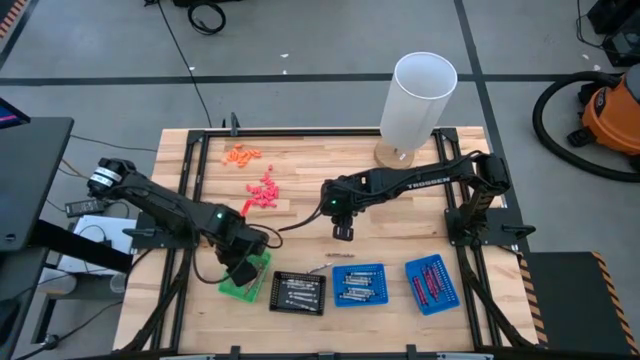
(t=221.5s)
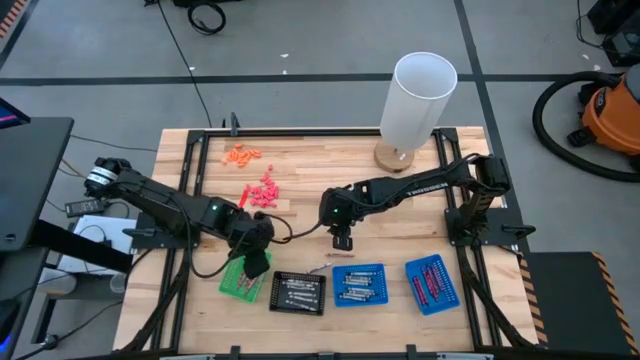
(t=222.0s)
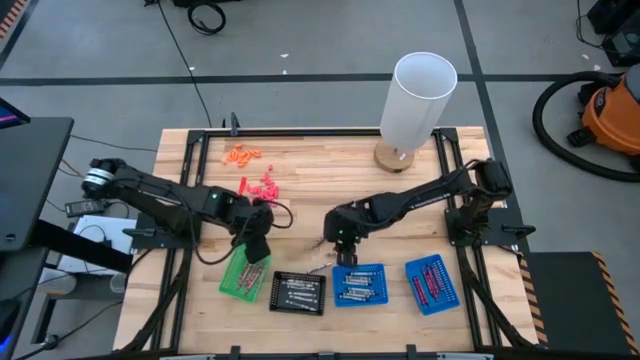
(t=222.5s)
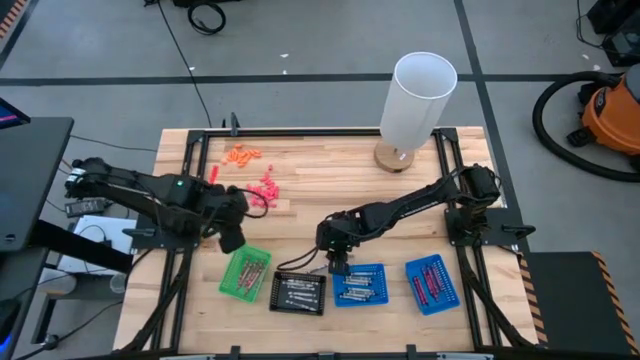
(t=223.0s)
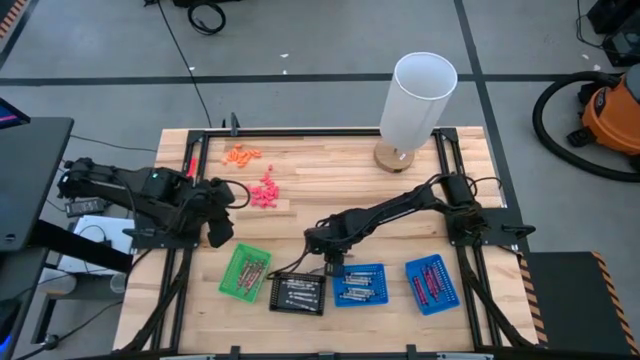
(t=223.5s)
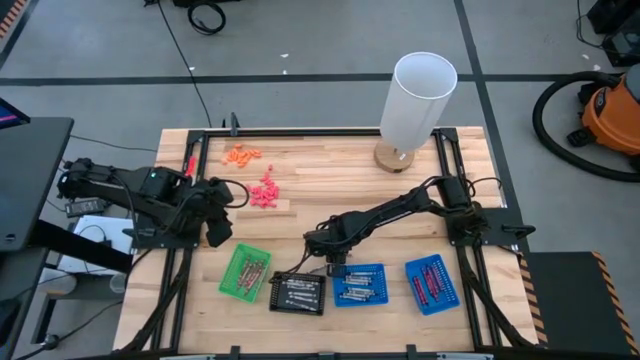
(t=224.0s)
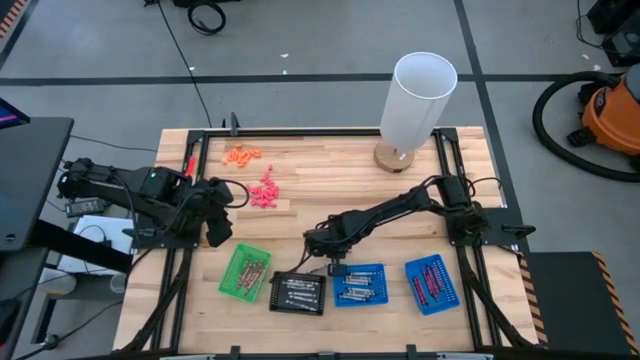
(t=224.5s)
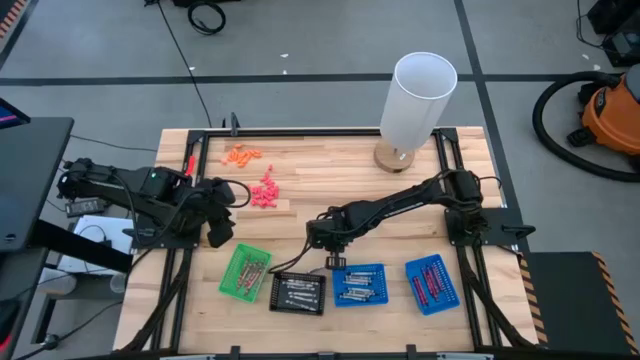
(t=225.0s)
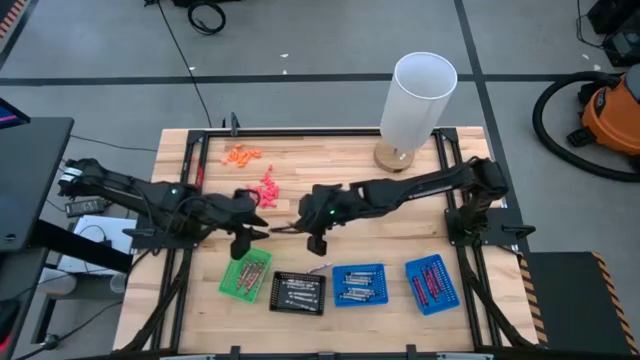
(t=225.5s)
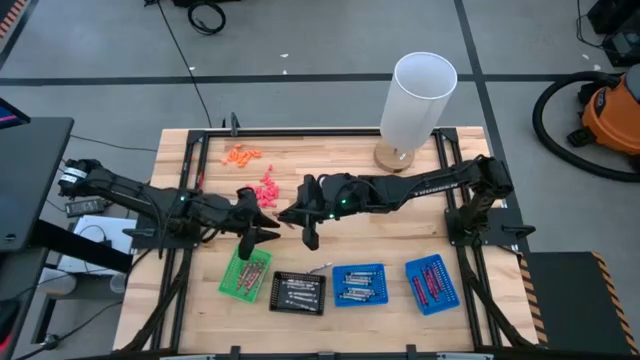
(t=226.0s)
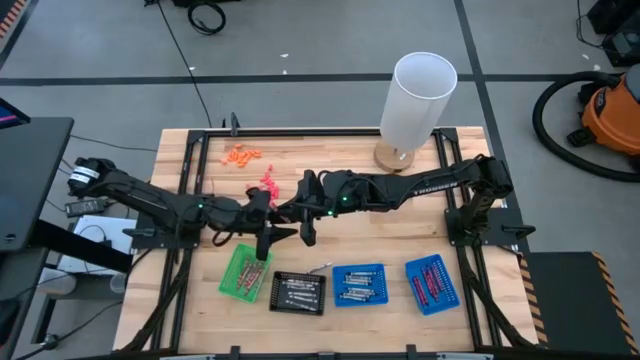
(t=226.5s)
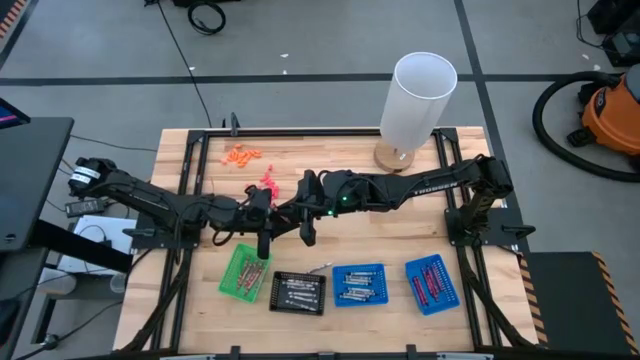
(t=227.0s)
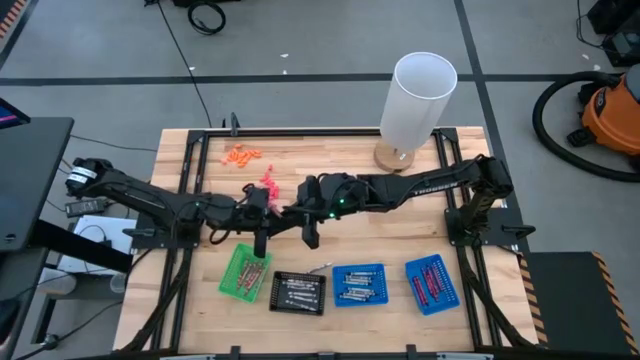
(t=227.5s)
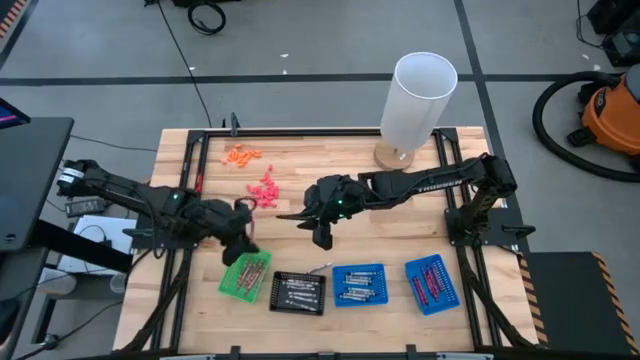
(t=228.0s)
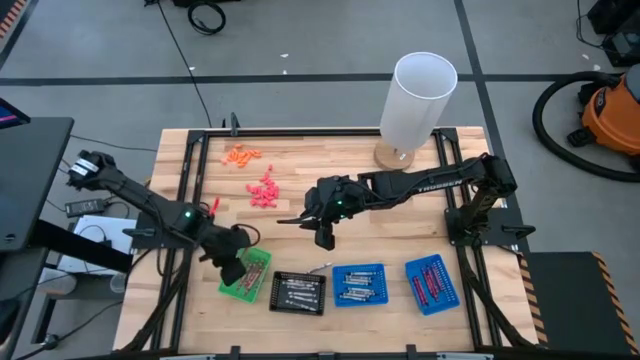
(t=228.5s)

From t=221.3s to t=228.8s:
Task: Sort crayons
Put the pink crayon into the green basket

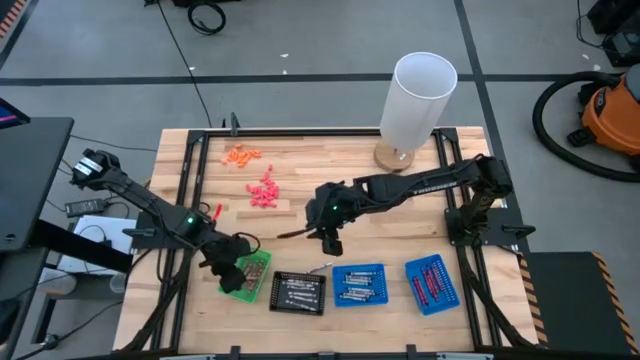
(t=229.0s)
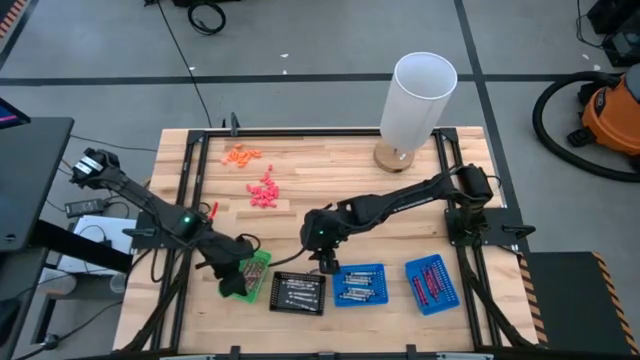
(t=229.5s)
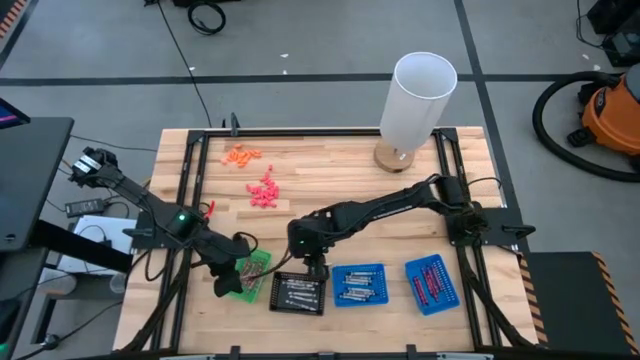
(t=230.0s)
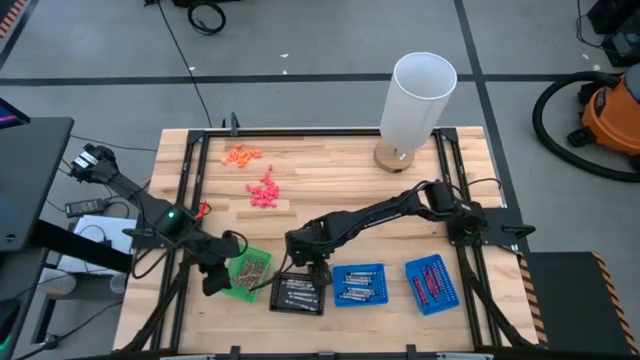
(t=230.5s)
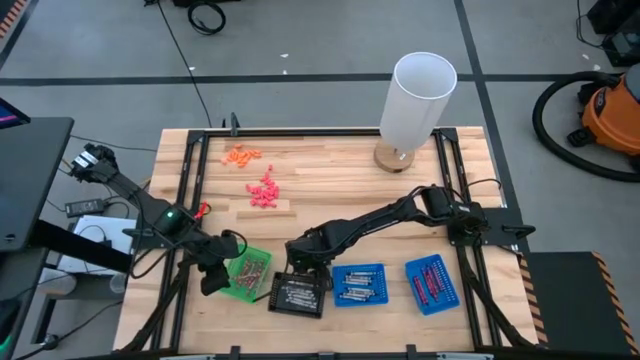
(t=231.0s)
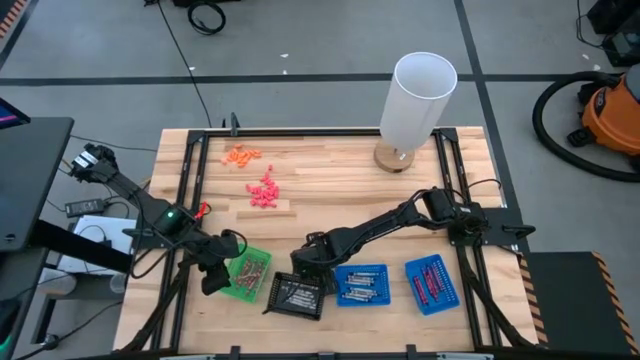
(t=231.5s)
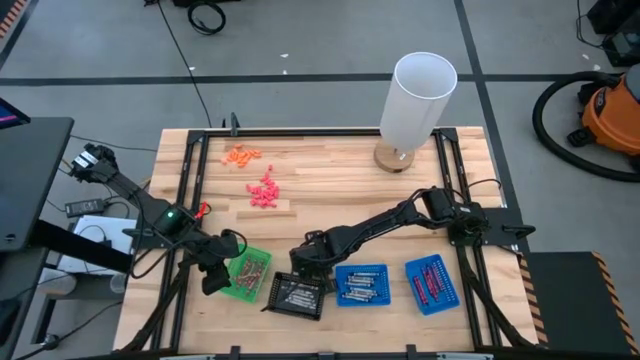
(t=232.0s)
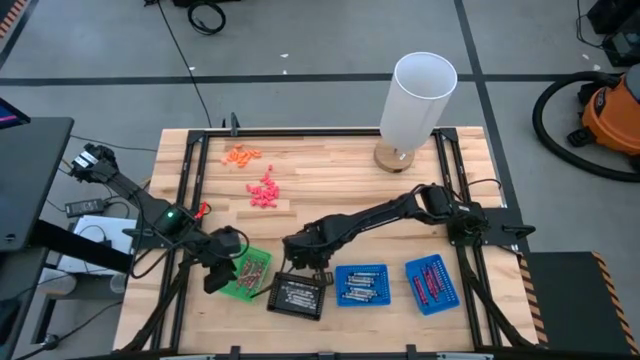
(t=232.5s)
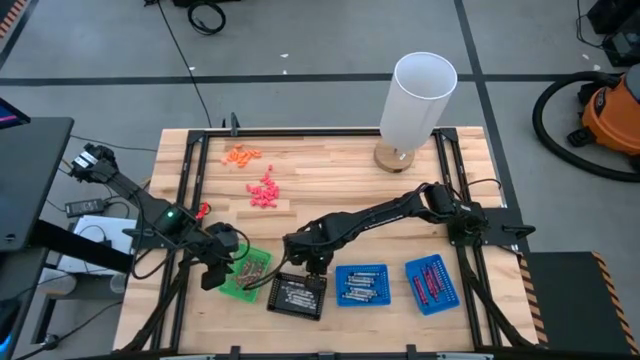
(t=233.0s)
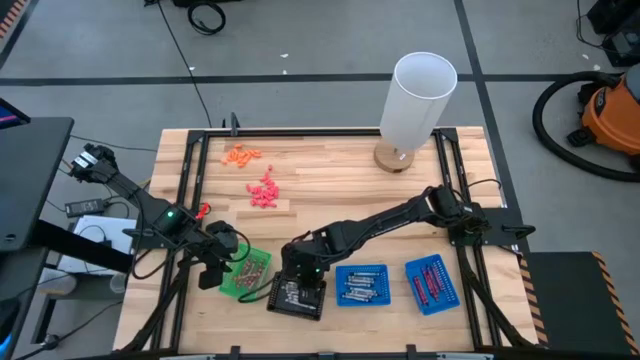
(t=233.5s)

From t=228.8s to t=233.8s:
Put the white crayon into the black basket

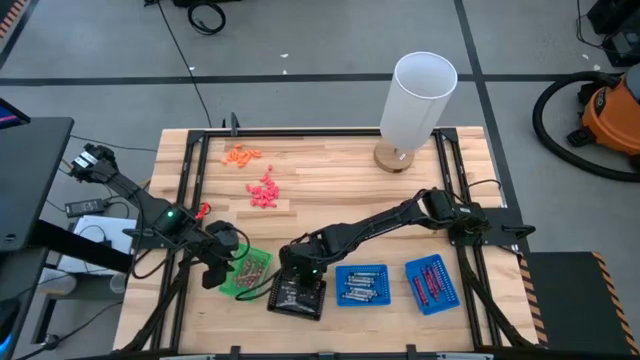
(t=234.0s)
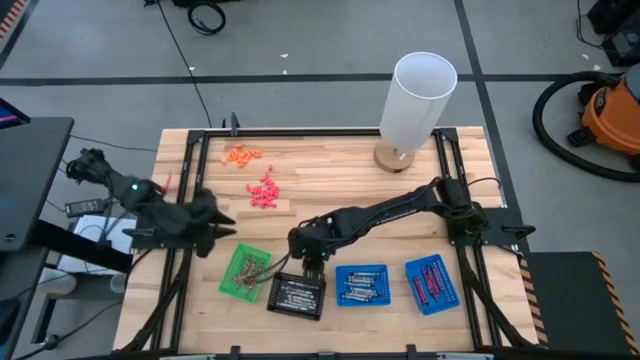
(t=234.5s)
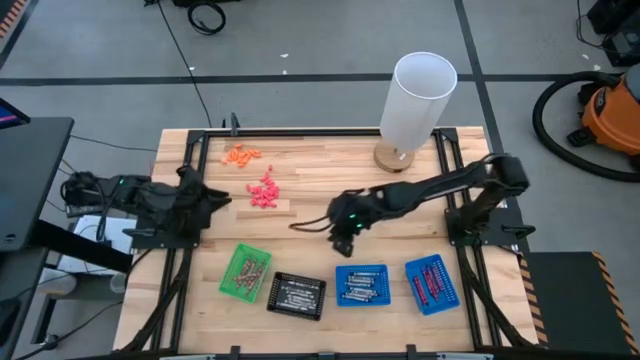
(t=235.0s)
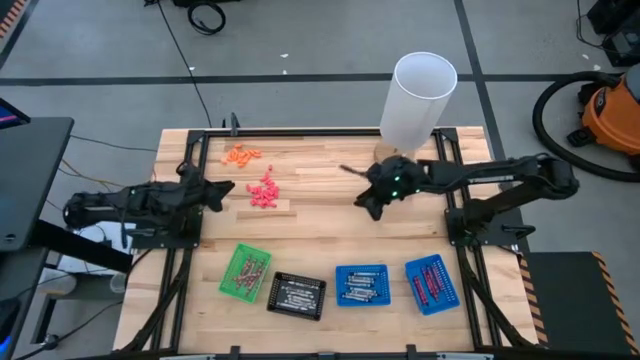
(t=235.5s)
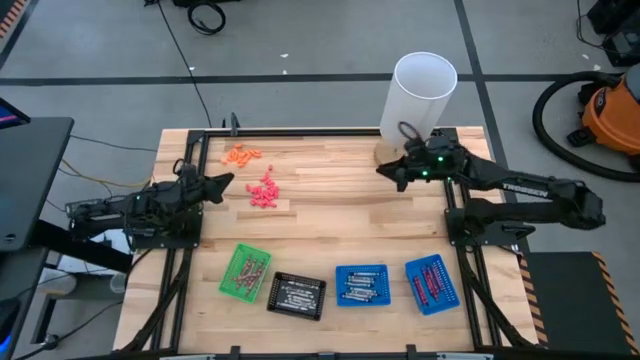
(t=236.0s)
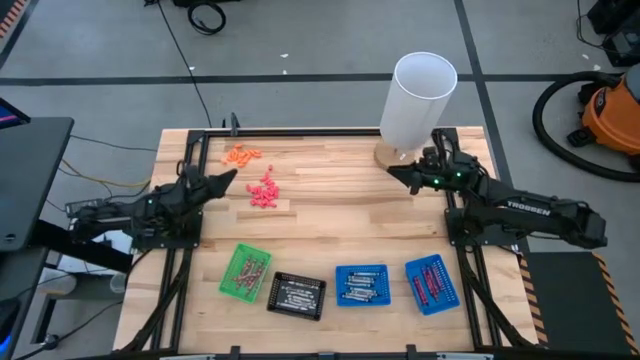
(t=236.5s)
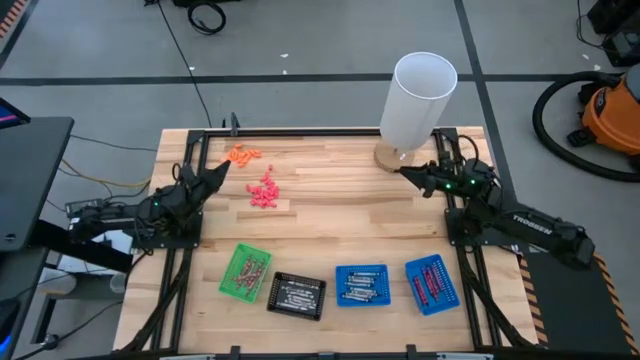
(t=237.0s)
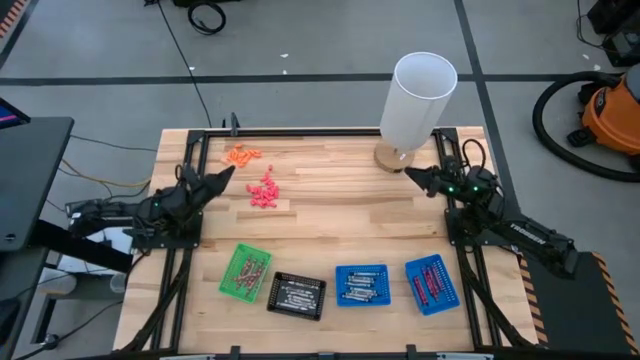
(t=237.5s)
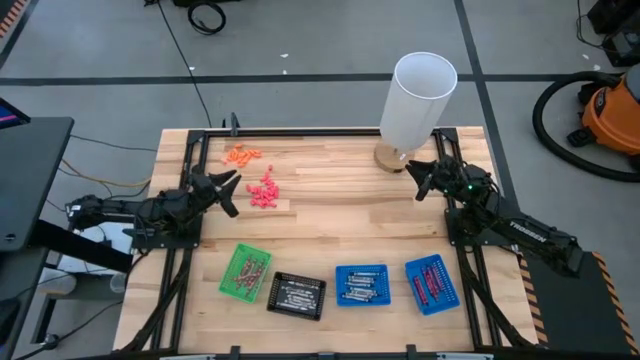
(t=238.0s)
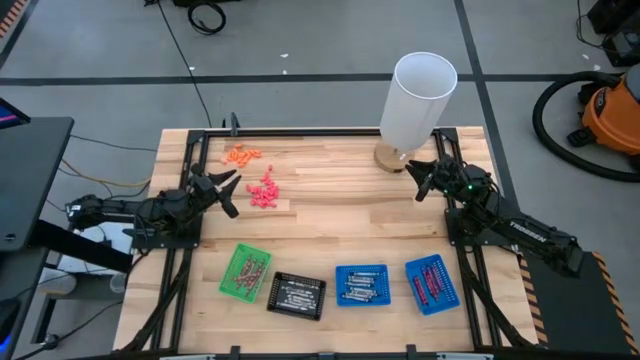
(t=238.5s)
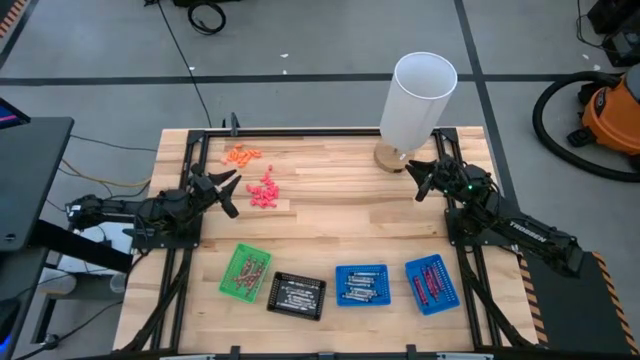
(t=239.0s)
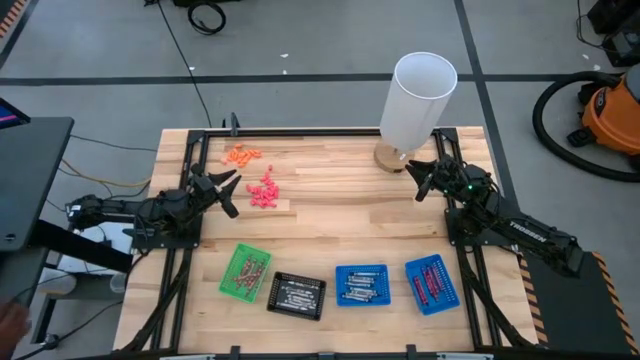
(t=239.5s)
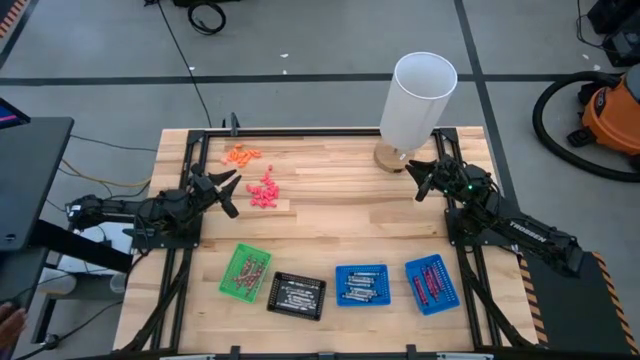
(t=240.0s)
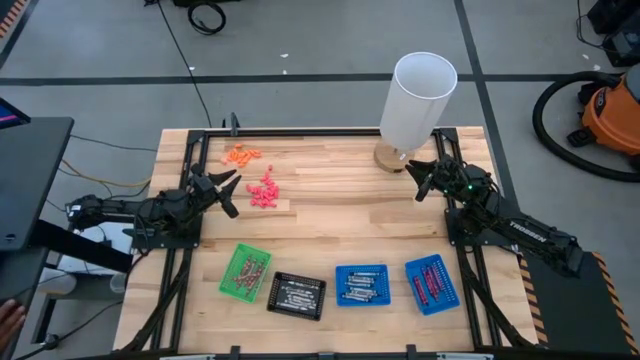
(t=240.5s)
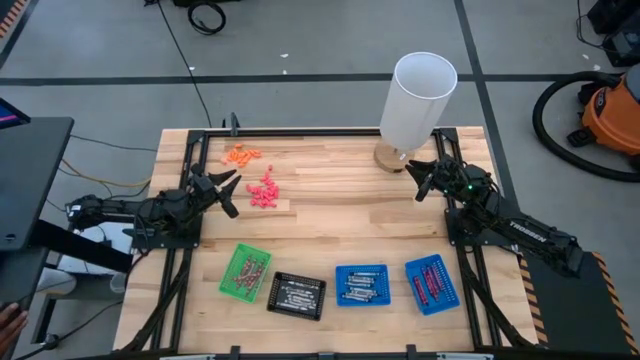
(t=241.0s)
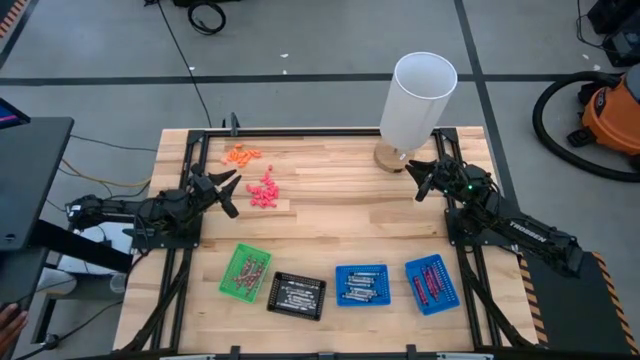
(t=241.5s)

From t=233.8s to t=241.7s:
Return to Home Position
